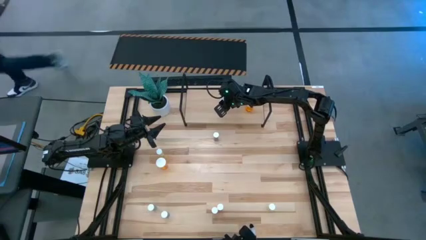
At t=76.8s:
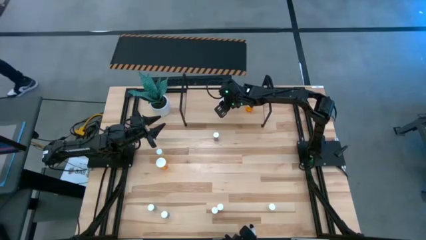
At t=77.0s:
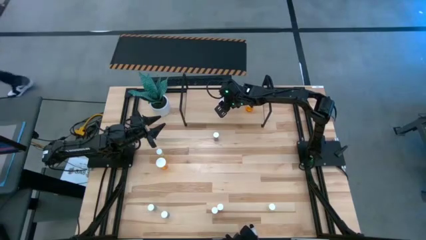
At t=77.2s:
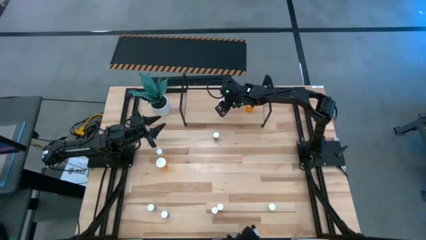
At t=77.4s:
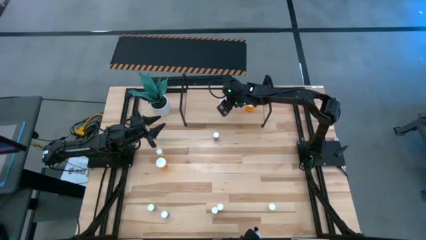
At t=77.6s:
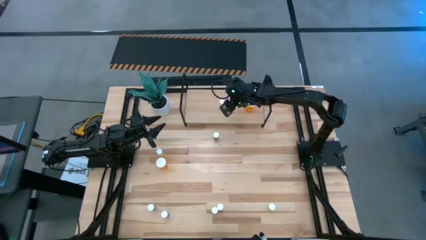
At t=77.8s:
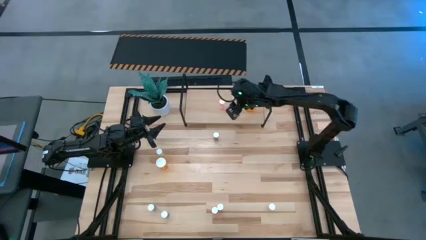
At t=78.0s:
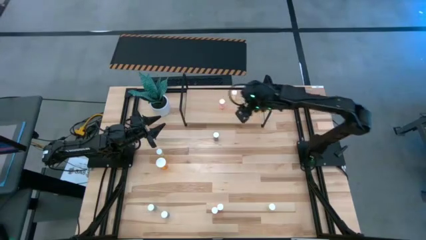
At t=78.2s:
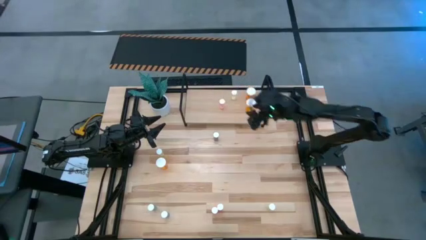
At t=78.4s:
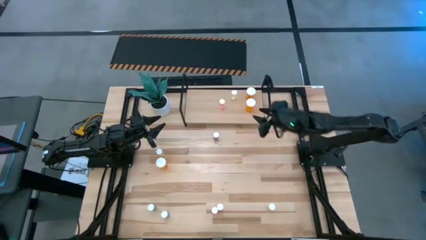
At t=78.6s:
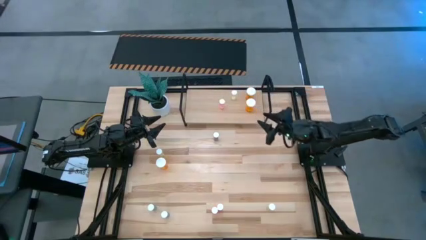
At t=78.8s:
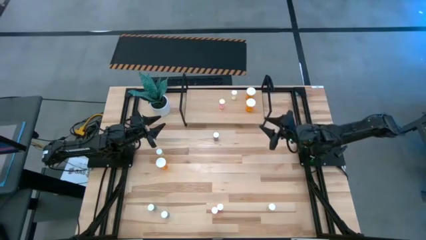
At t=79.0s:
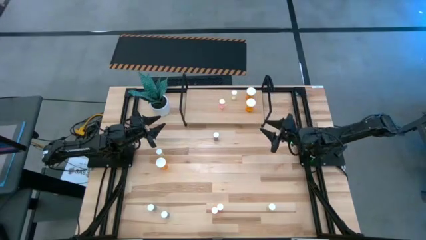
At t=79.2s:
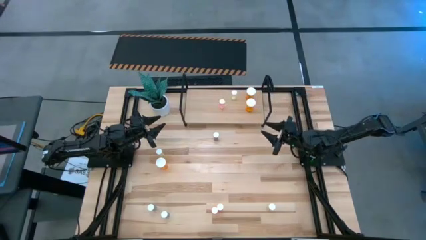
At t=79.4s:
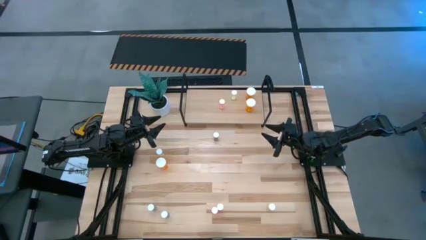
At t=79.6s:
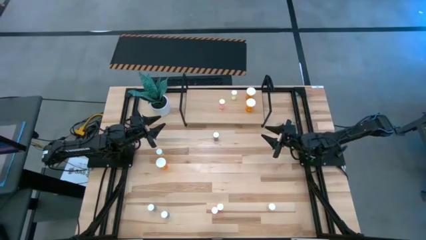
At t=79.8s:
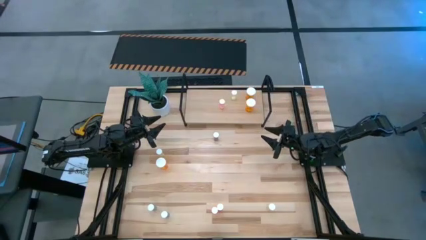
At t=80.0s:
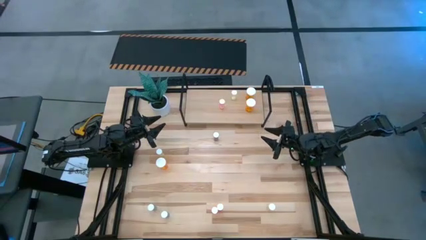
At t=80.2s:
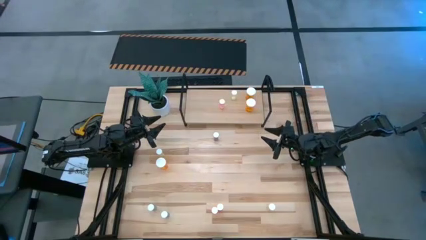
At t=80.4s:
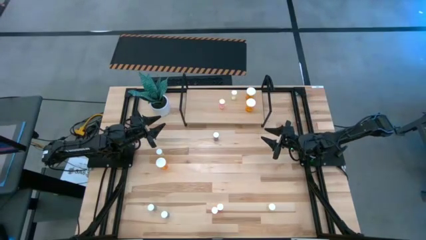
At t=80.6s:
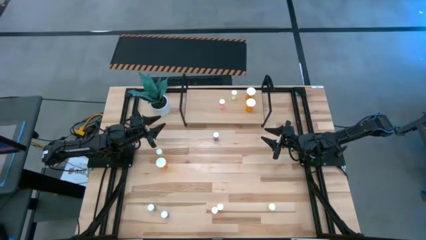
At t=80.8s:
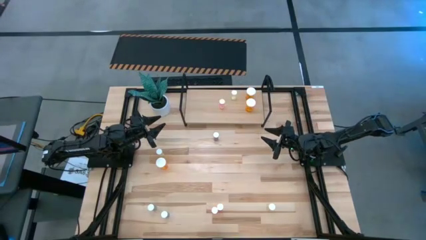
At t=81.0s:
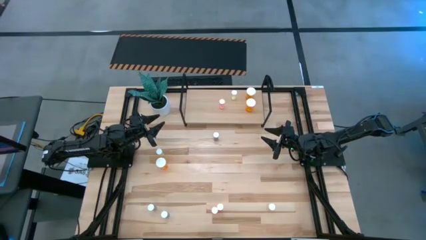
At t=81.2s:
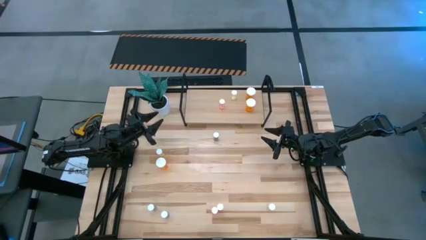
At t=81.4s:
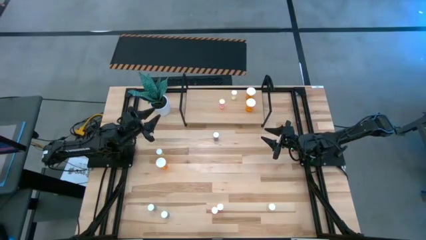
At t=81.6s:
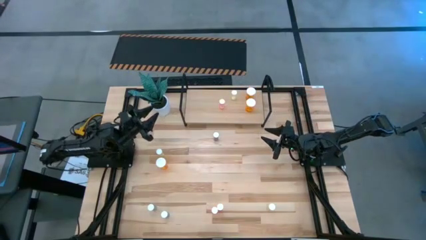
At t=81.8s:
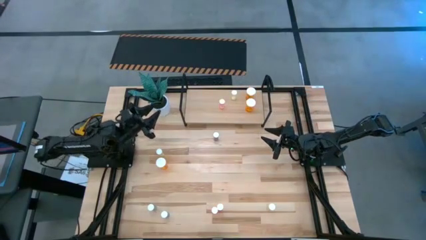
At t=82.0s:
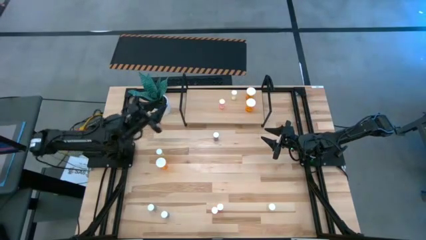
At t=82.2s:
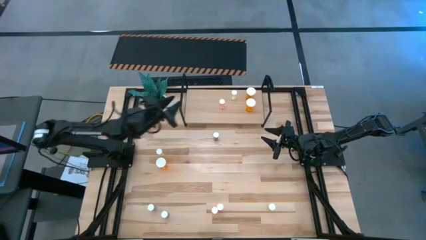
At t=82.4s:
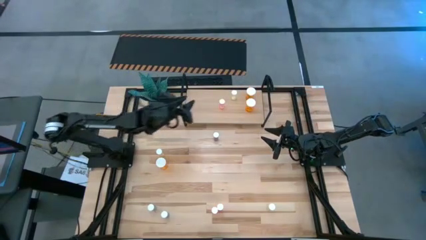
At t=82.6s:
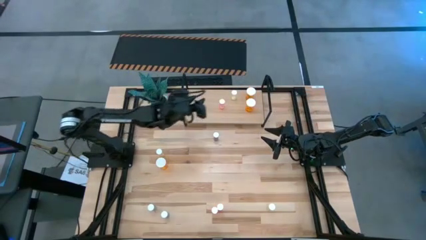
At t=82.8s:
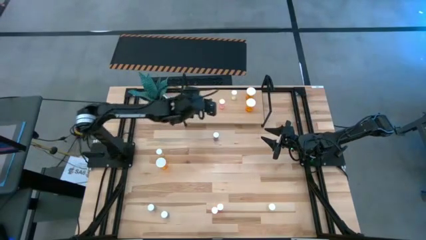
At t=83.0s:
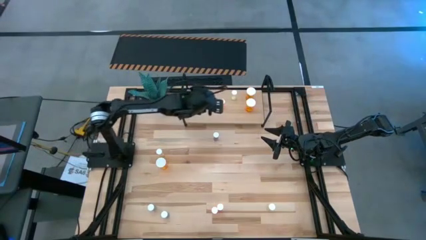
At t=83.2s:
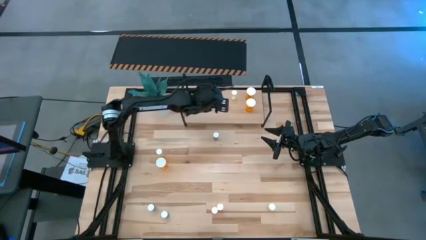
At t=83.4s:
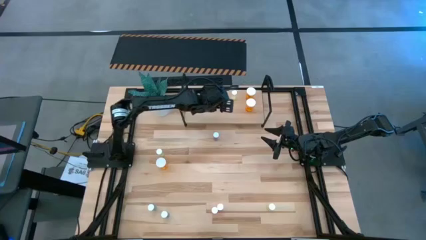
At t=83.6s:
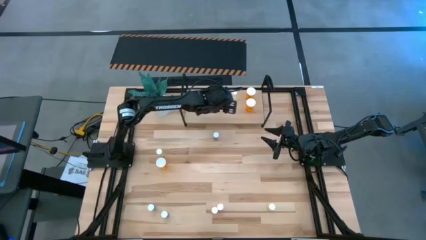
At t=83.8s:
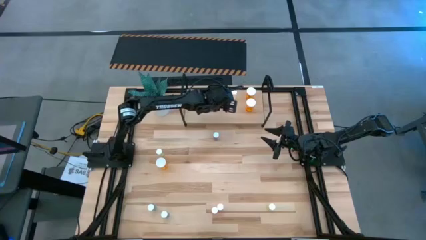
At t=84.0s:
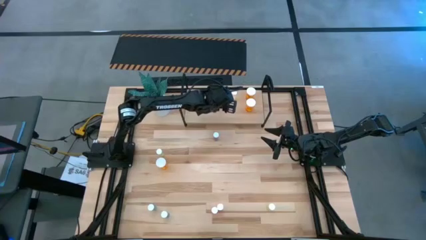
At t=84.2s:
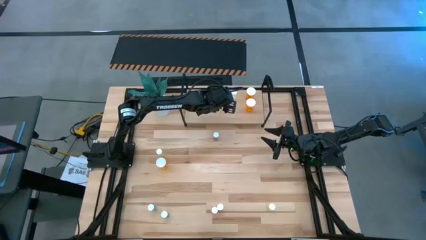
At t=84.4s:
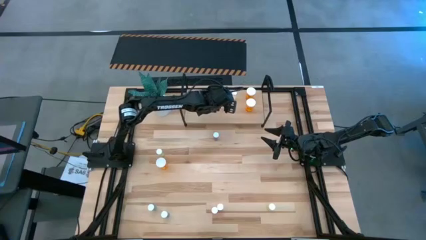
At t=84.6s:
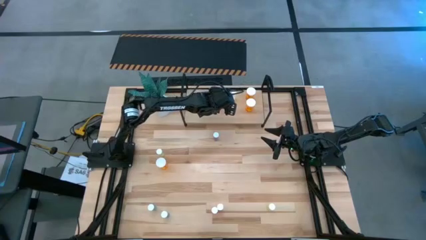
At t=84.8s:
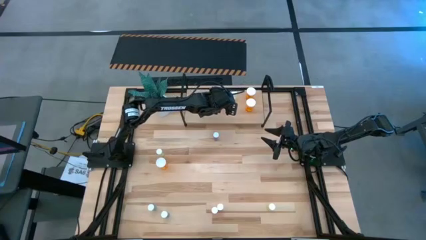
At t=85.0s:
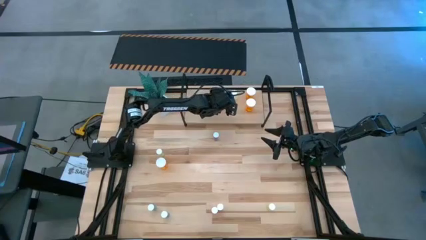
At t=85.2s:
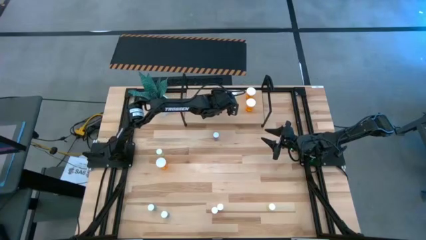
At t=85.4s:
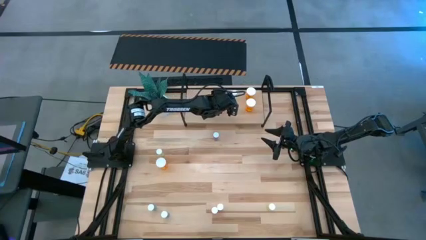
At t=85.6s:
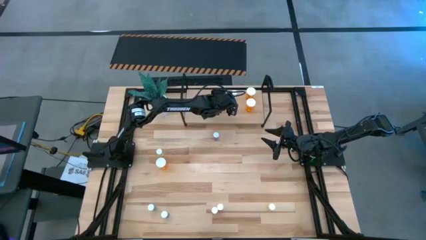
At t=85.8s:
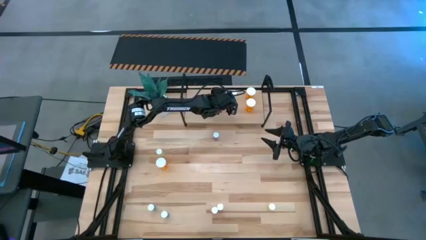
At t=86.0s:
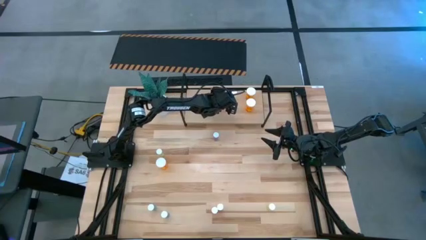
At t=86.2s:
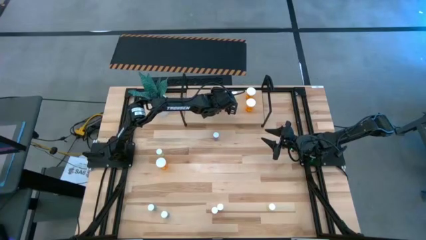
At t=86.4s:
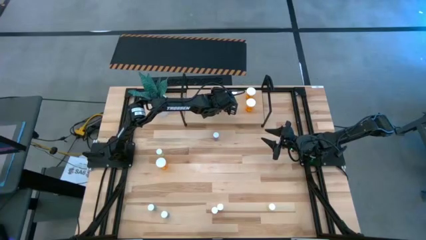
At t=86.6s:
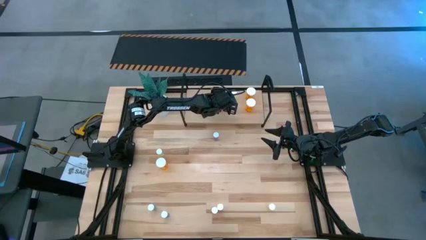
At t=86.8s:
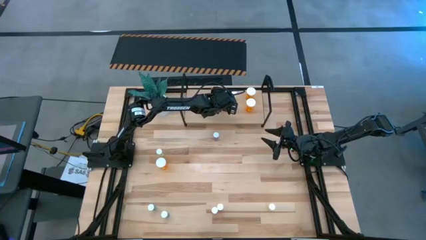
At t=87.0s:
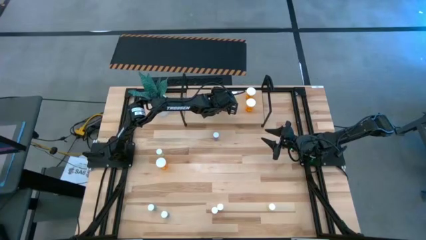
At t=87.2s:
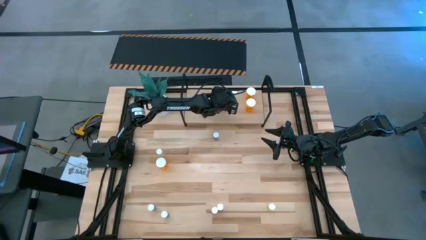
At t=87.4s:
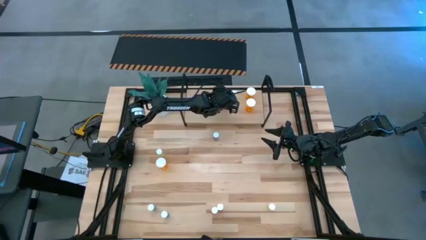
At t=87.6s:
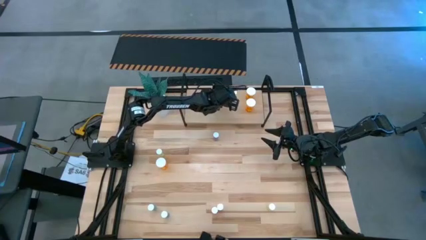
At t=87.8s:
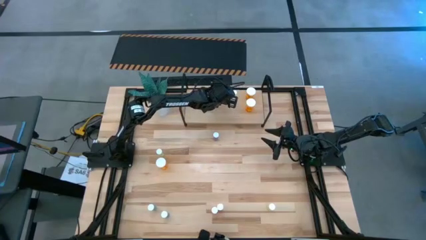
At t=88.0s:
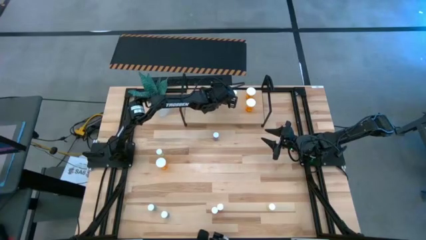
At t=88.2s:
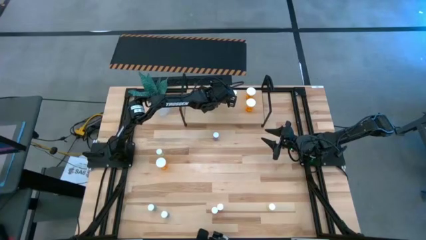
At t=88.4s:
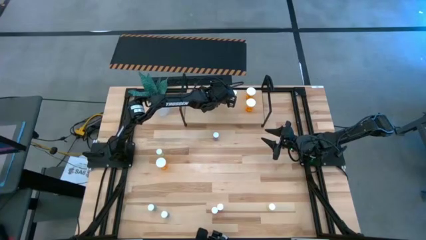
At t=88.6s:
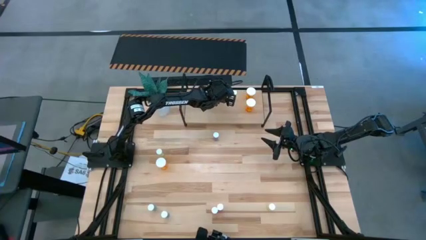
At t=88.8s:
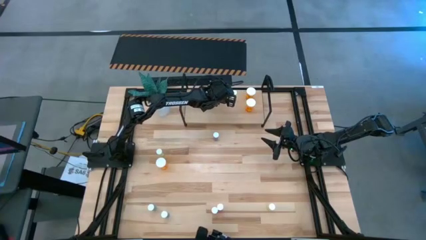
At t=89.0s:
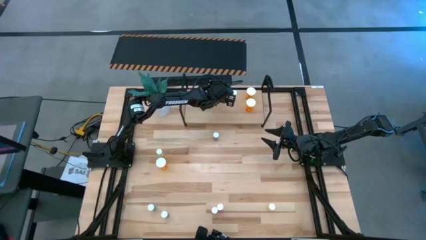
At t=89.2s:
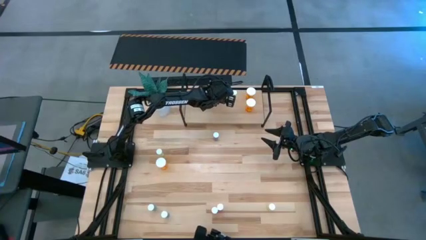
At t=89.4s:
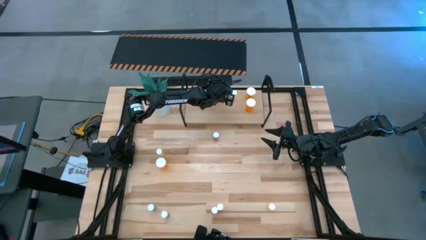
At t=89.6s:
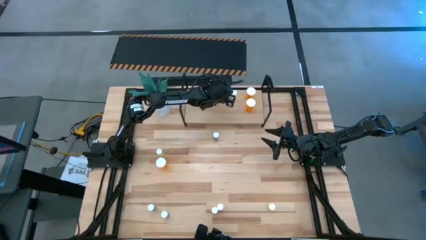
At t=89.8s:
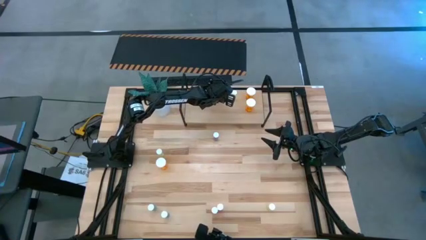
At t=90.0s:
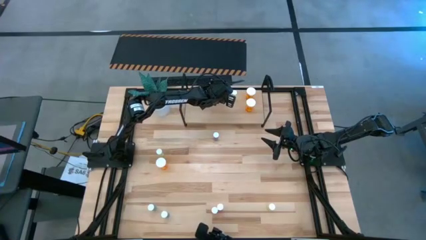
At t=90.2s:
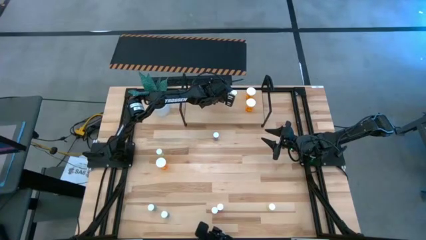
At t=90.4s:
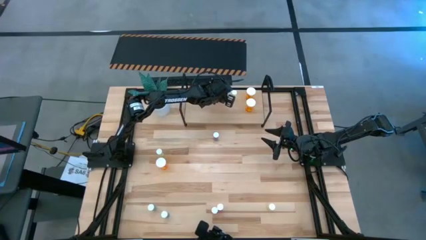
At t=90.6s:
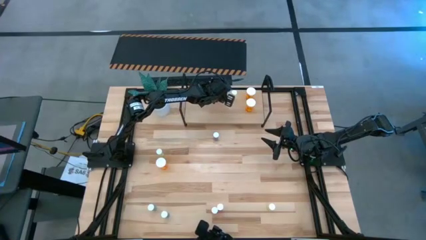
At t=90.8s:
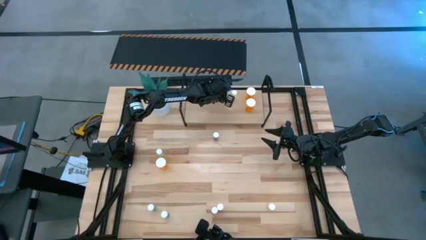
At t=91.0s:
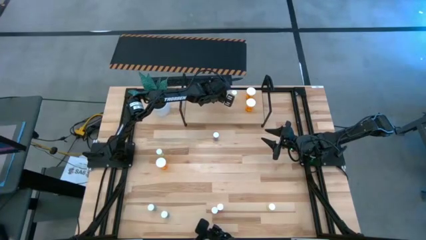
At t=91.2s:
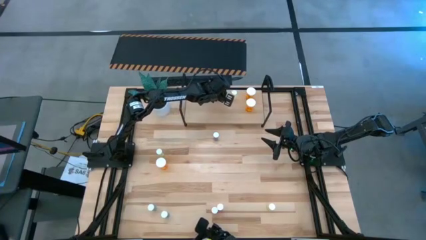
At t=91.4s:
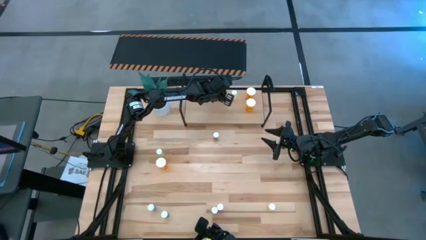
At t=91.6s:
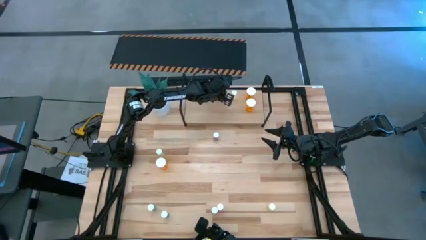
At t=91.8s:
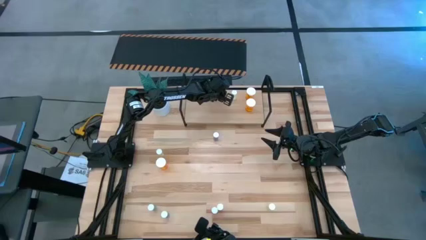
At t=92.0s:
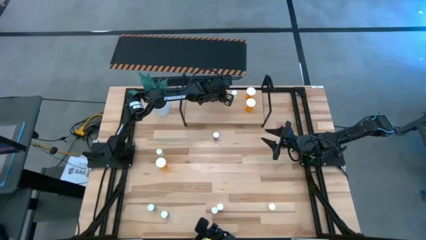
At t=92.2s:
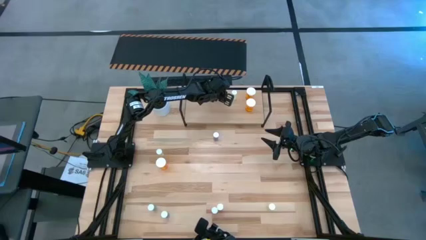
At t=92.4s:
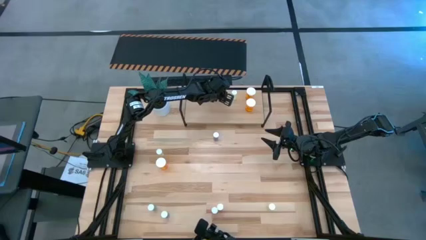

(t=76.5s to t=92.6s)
Task: Pick and place medicine bottles onto shelf by color
Put the red pill bottle on the shelf

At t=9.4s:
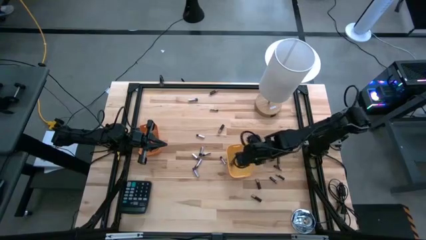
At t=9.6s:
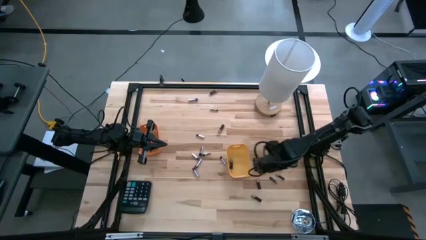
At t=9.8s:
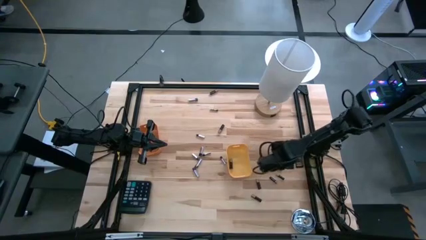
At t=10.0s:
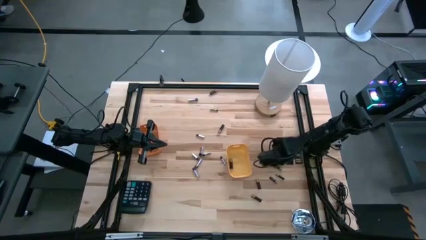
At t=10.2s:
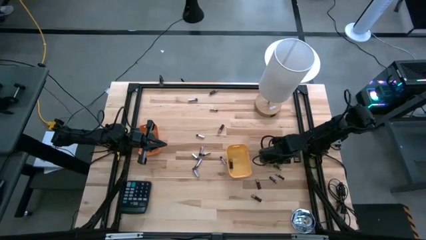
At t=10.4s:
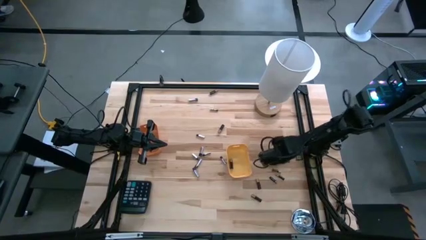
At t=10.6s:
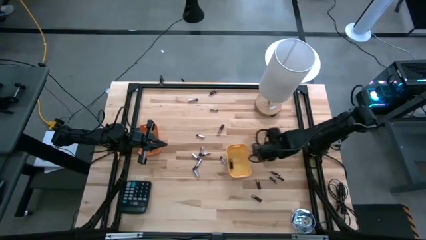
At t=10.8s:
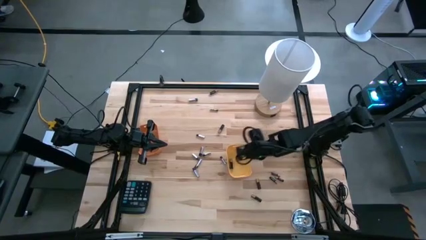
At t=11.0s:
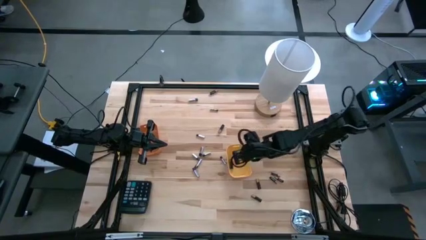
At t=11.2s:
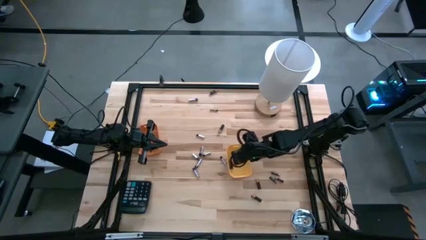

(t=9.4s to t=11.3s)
Task: Sort batteries
Put the black battery into the yellow bin
